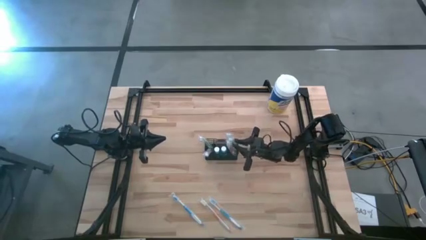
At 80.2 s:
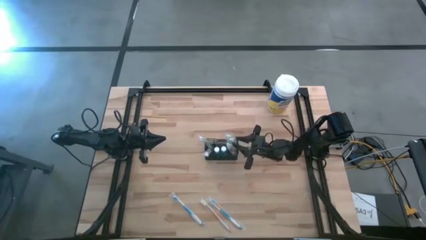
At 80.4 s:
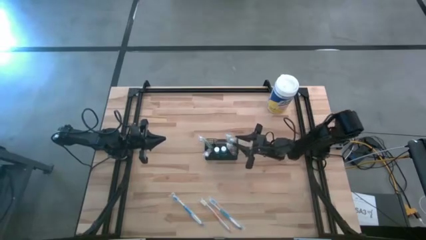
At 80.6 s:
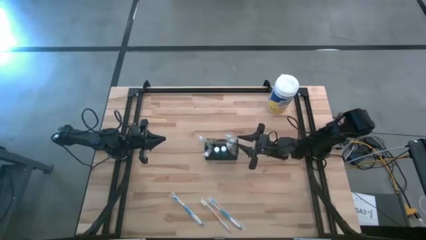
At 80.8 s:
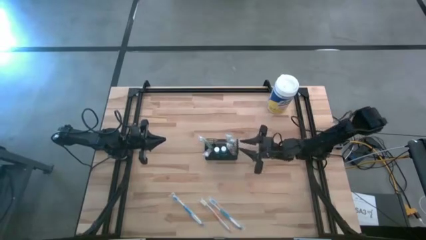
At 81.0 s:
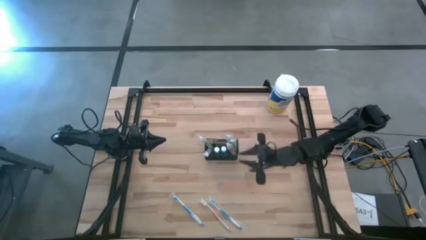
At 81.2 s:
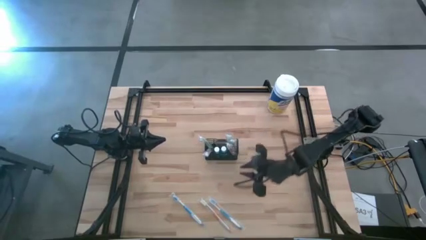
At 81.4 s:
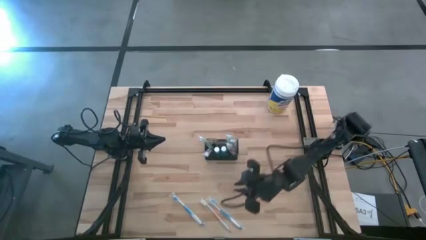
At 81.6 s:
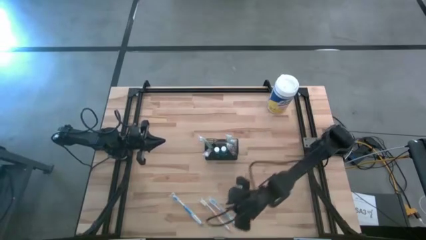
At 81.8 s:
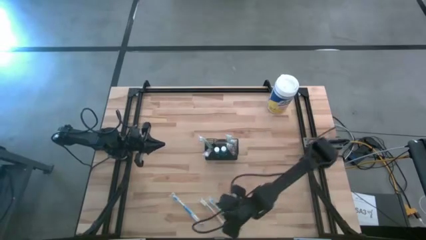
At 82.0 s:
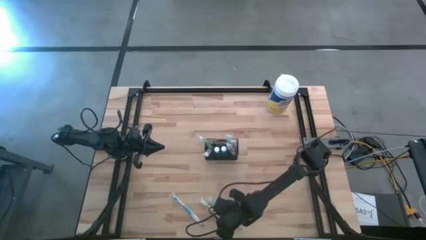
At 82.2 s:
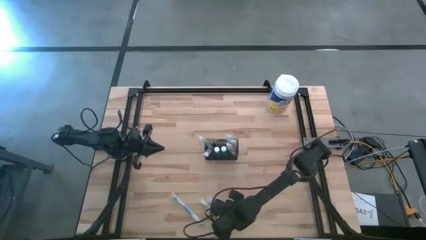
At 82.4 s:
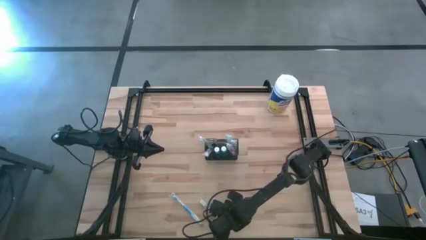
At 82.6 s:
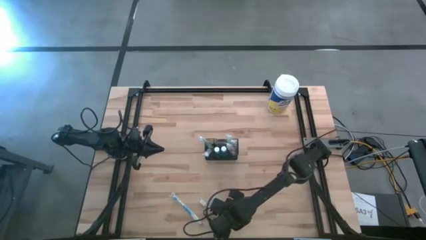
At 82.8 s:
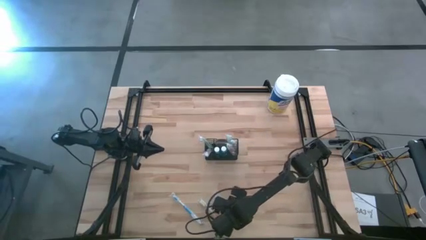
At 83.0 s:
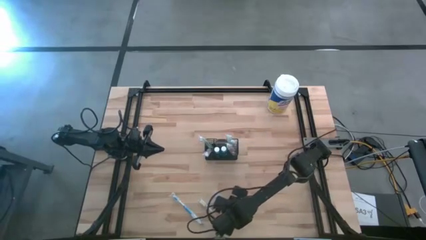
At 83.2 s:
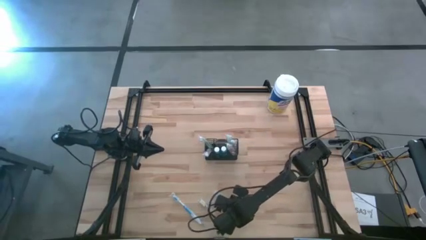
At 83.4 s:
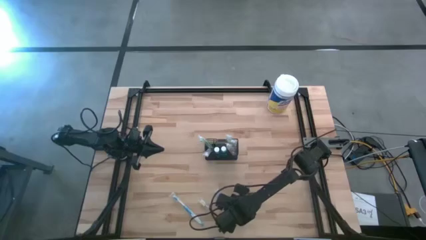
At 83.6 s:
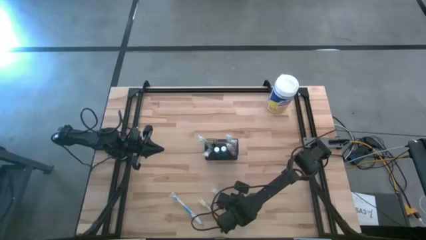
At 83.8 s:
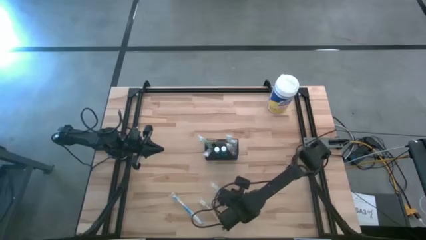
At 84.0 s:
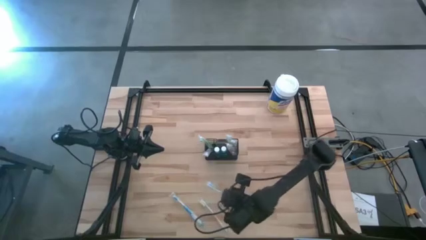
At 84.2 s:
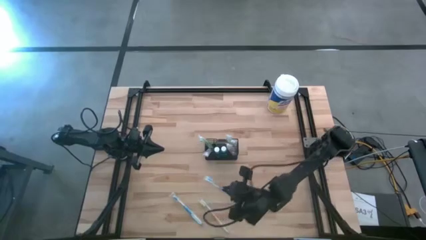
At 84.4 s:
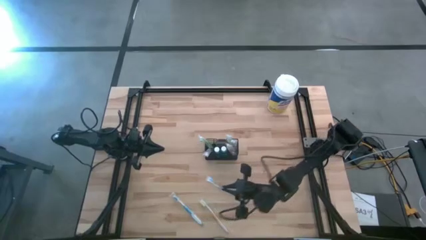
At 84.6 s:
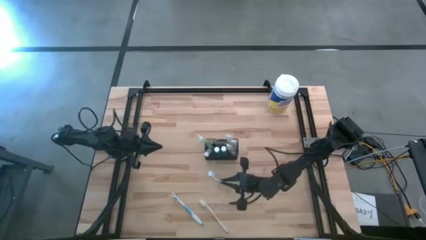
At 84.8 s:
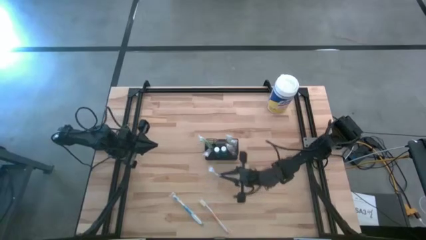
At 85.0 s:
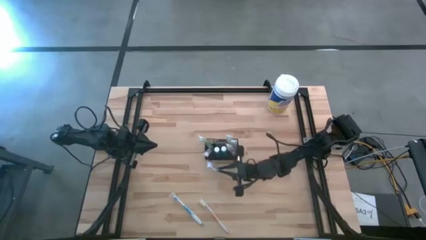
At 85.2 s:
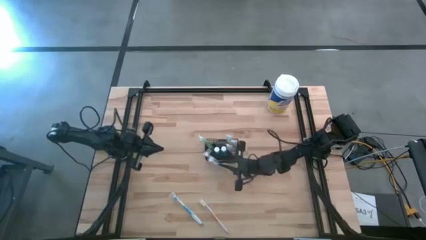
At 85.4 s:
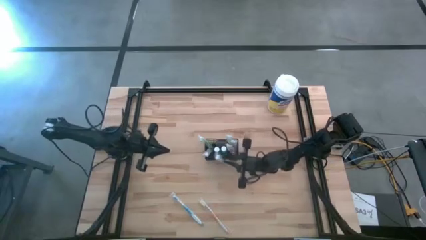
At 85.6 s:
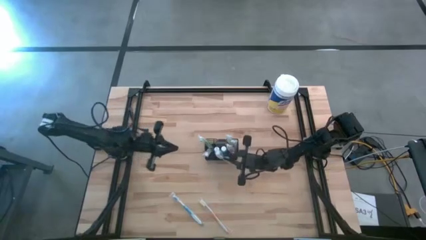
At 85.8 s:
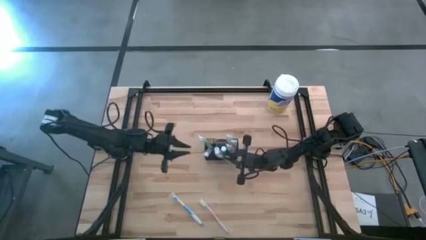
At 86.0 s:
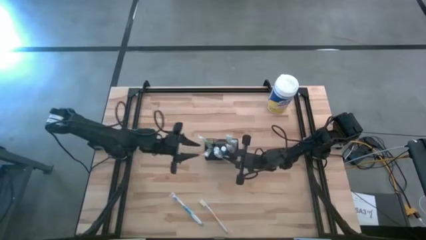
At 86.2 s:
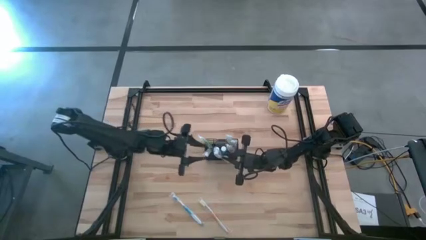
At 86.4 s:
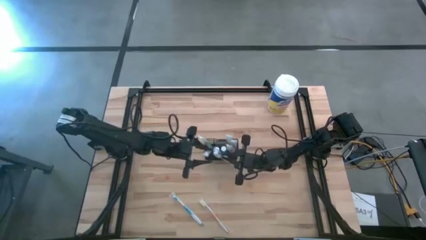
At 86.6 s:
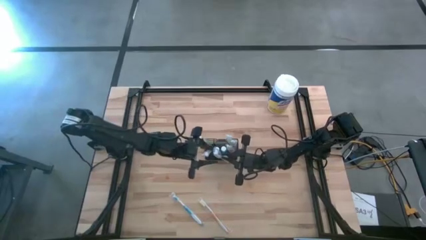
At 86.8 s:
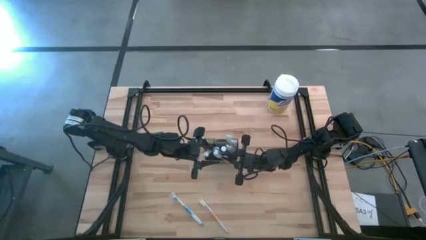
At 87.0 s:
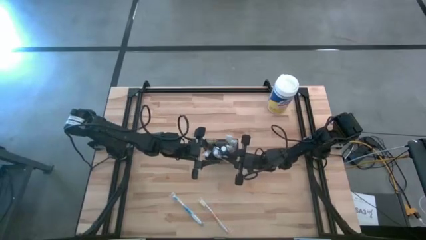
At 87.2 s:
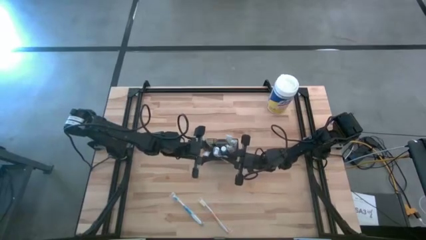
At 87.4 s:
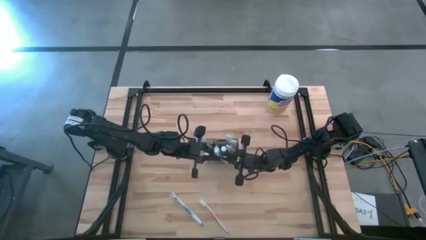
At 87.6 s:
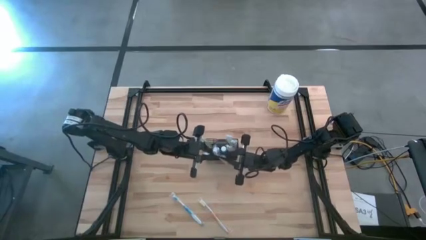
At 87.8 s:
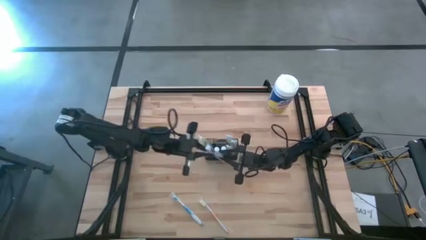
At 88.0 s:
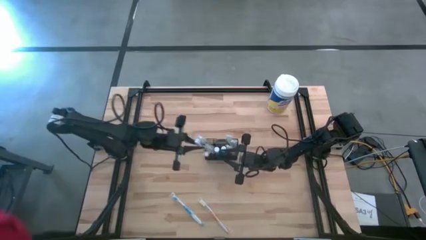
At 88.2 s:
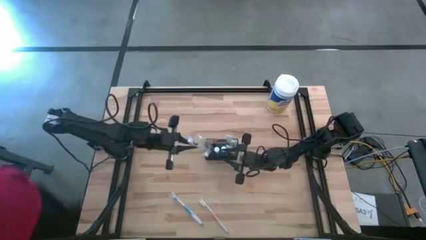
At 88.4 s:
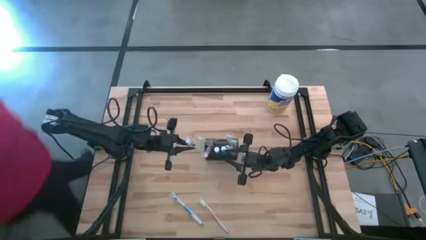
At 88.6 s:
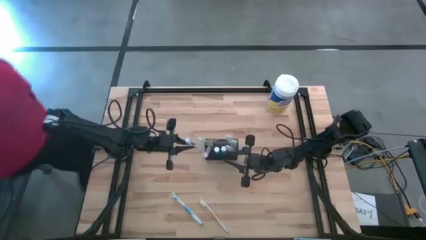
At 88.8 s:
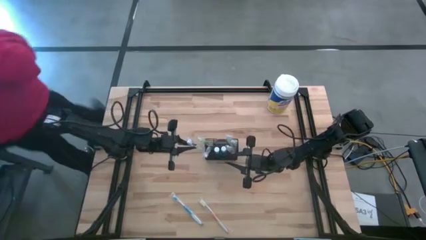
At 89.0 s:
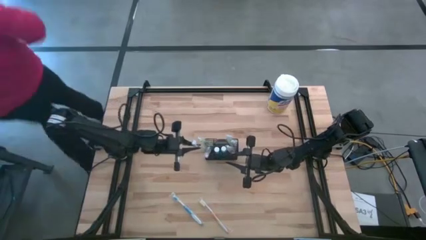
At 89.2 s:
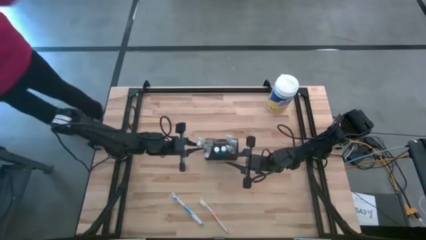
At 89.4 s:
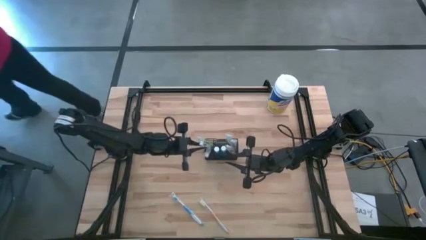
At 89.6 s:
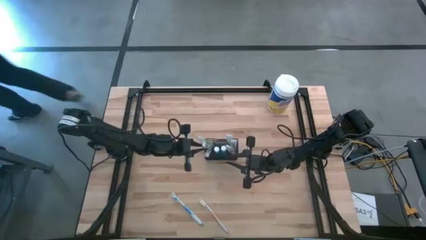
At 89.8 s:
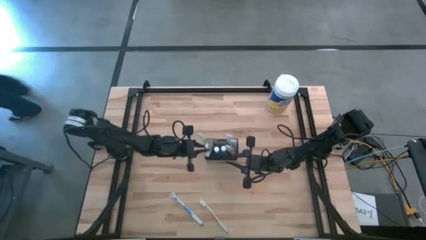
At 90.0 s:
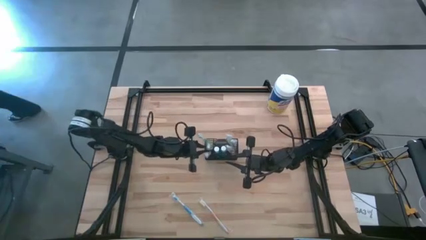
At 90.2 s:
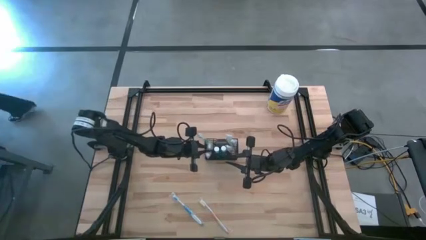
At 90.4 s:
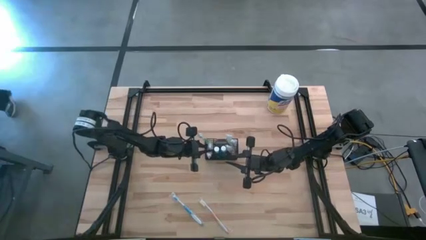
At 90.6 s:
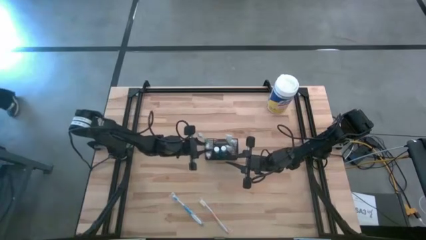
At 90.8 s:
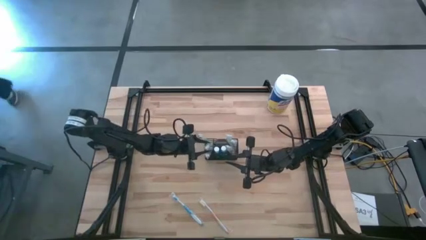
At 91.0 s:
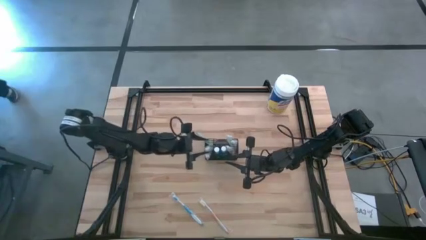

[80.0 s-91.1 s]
Task: Pick & Place toothbrushing station
Put the blue toothbrush into the black organizer

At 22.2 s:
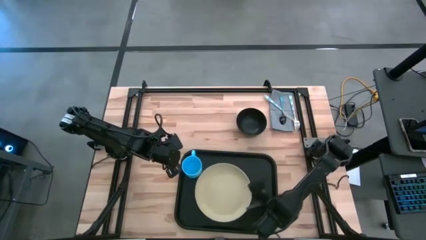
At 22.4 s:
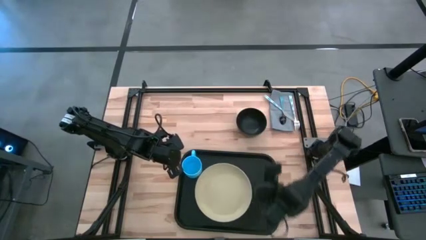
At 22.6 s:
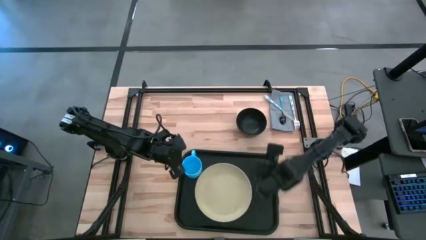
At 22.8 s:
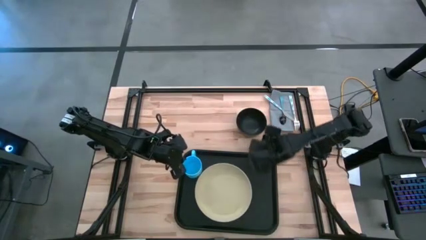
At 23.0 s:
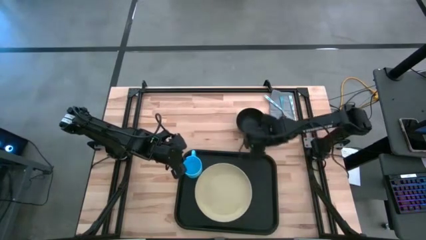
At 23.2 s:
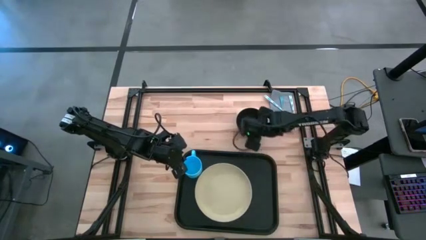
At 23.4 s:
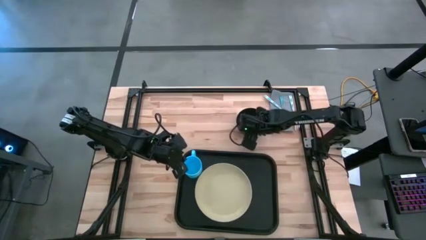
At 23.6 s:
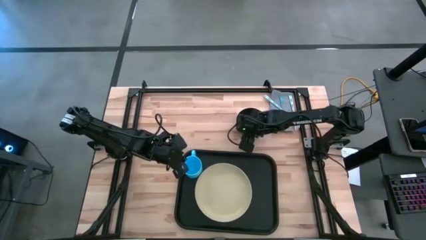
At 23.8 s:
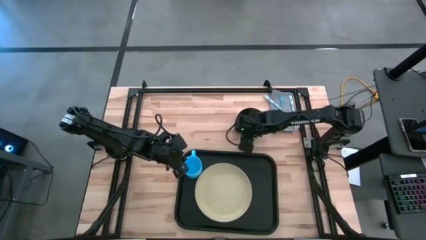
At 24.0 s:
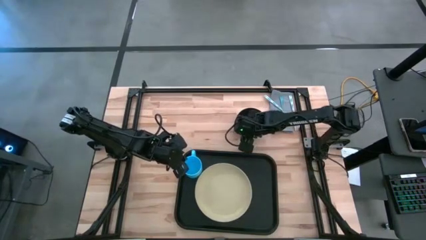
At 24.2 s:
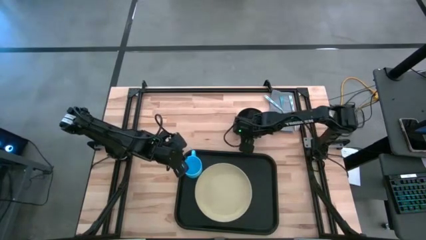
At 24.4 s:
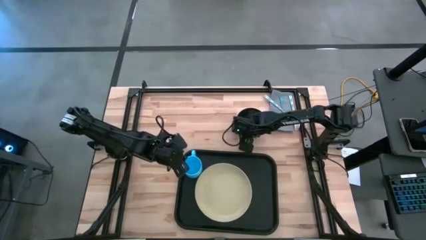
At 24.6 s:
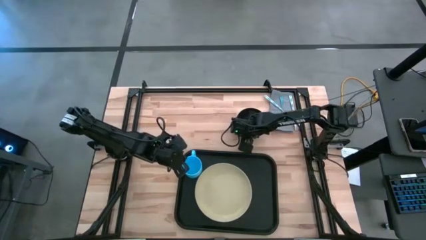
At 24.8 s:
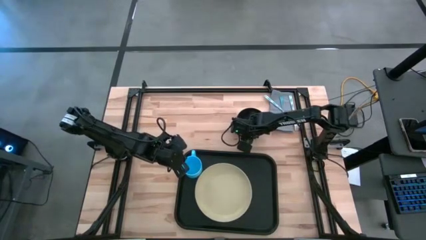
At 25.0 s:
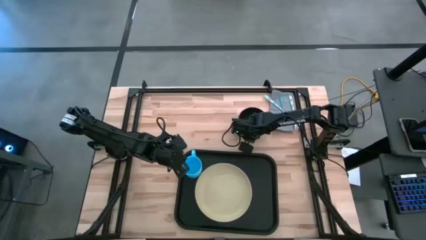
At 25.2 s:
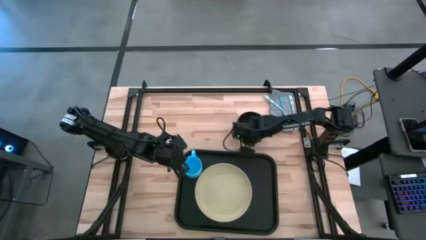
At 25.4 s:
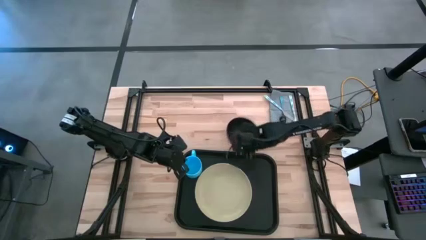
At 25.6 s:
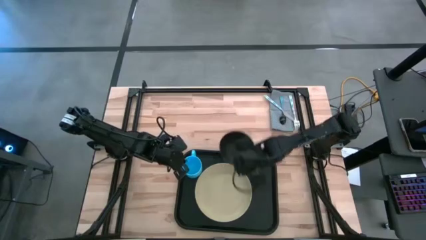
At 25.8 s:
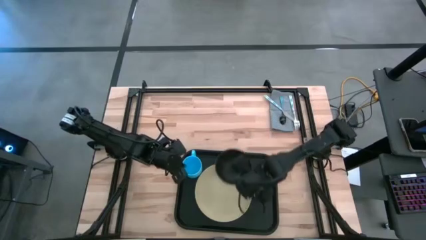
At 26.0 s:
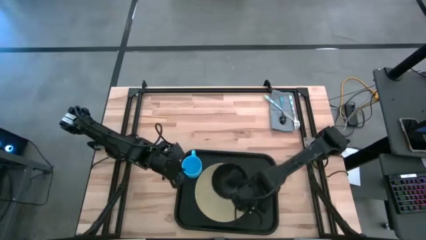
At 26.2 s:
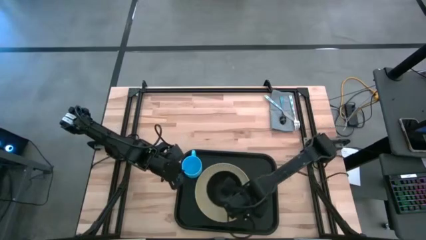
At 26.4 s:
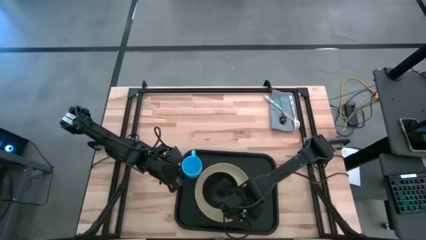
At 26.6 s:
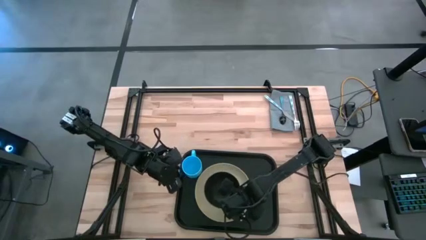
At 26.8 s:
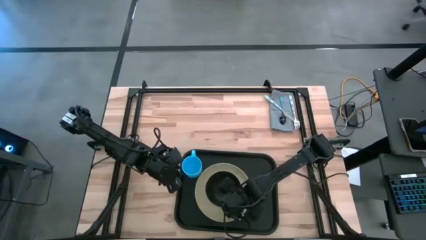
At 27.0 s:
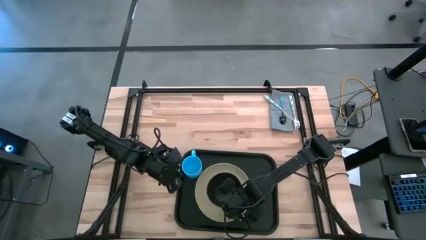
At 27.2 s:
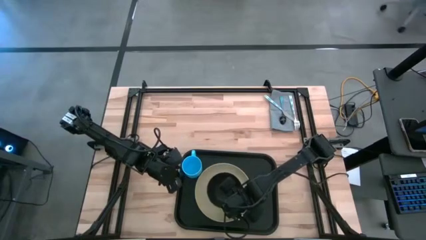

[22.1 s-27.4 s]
Task: Set up tray
Put the black bowl on top of the brown plate on the black serving tray
